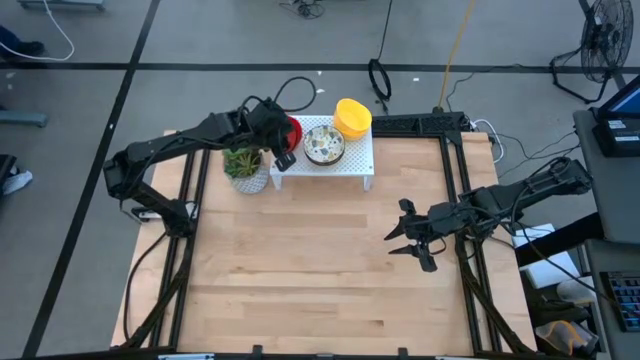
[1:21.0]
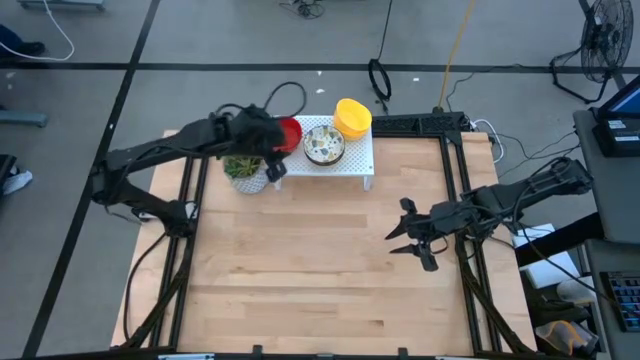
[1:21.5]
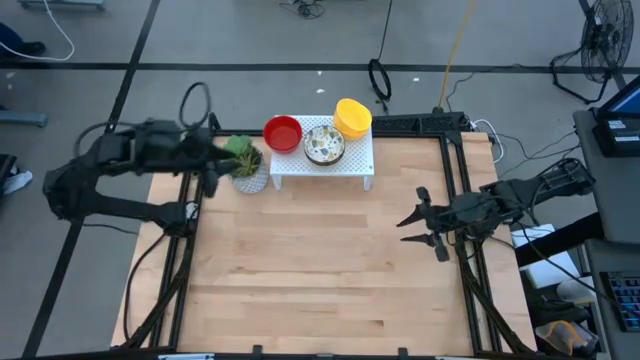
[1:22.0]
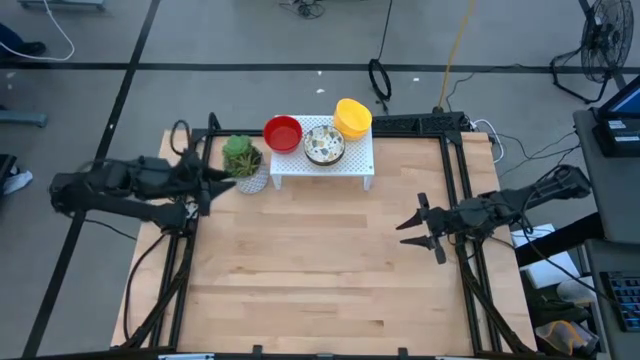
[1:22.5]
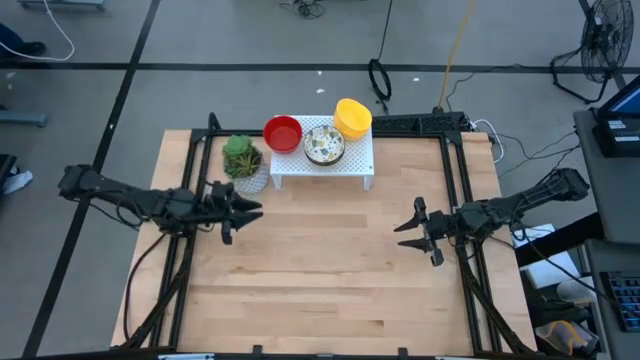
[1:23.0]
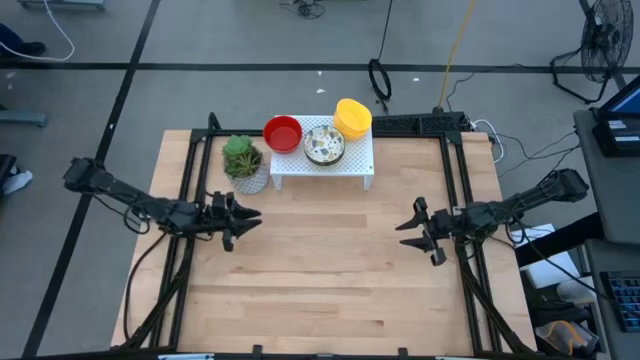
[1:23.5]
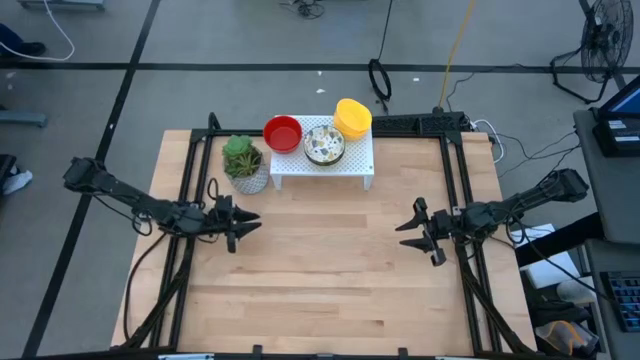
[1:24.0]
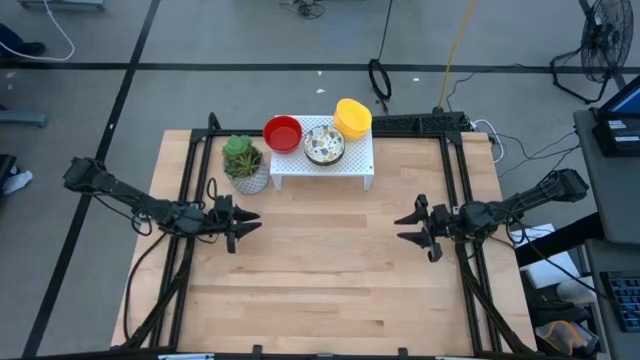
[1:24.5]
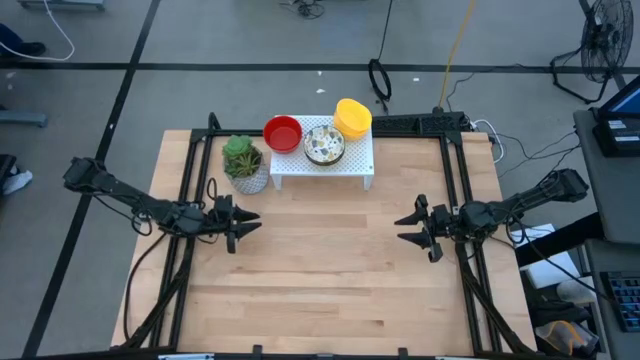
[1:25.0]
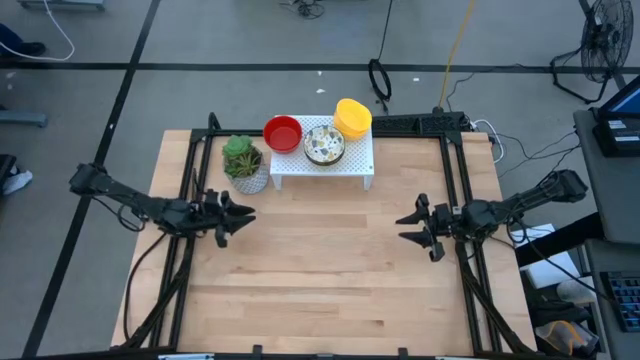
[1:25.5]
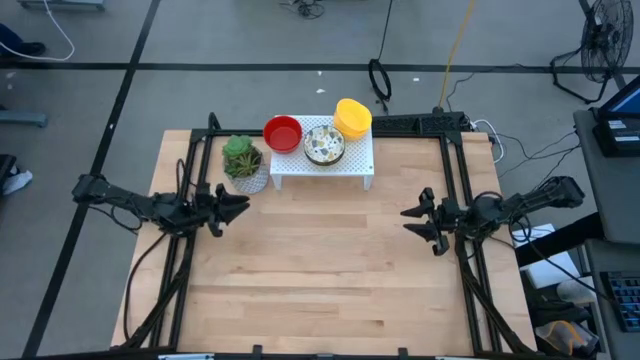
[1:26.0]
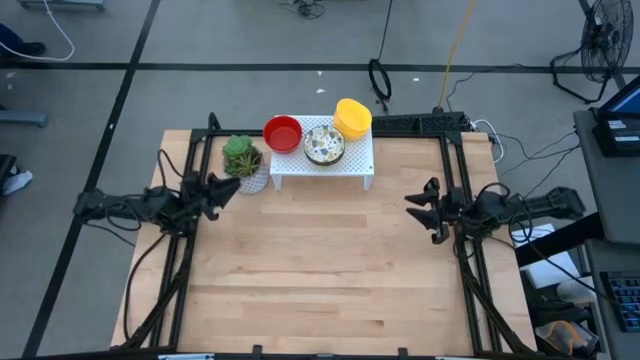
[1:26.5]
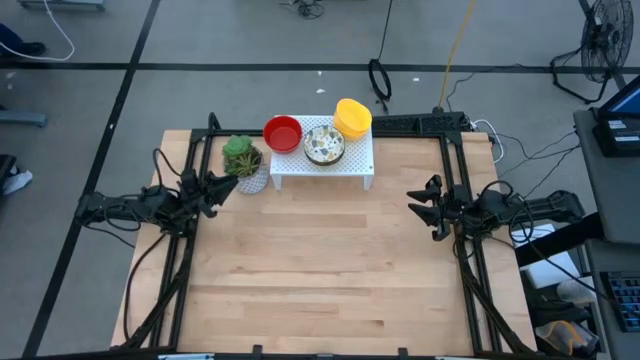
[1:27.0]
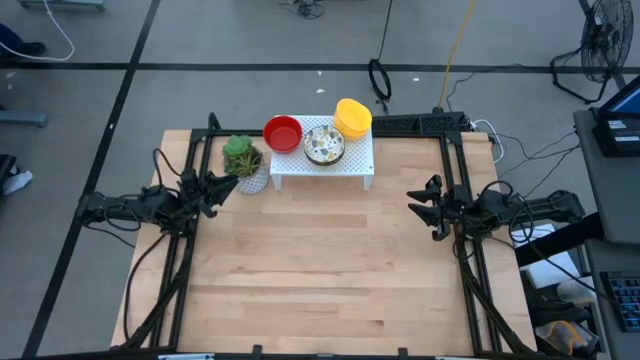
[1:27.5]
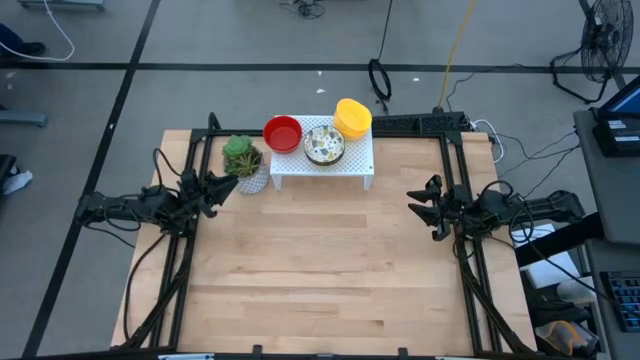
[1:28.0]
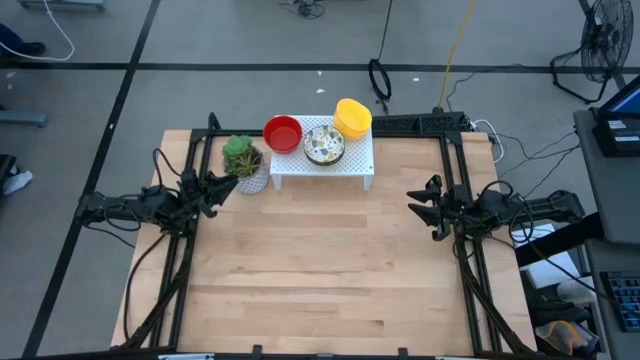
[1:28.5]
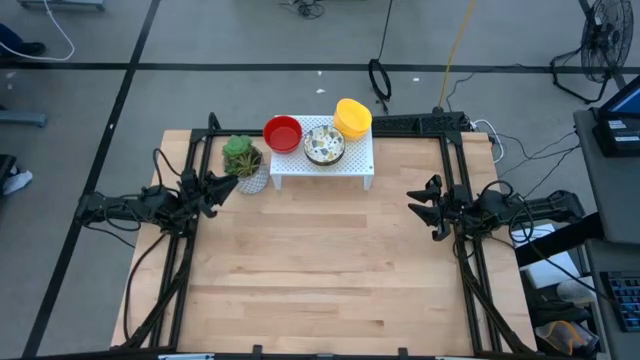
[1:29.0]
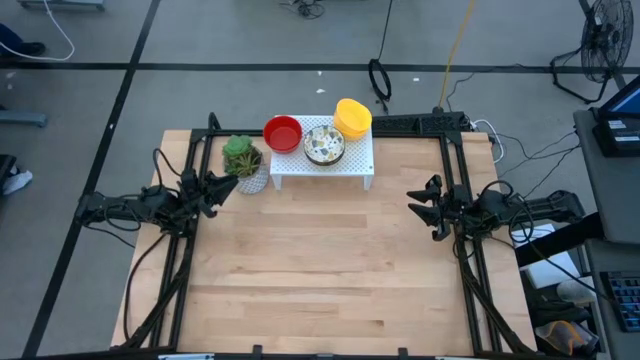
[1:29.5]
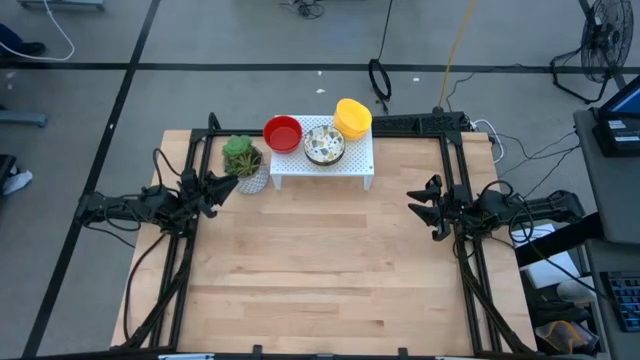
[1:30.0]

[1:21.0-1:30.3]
Task: Pick & Place Mini bowls
Return to Home Position

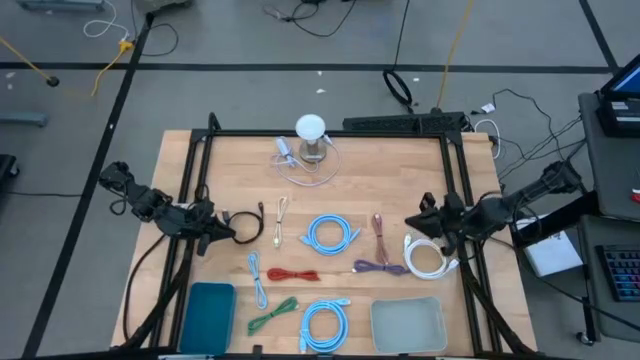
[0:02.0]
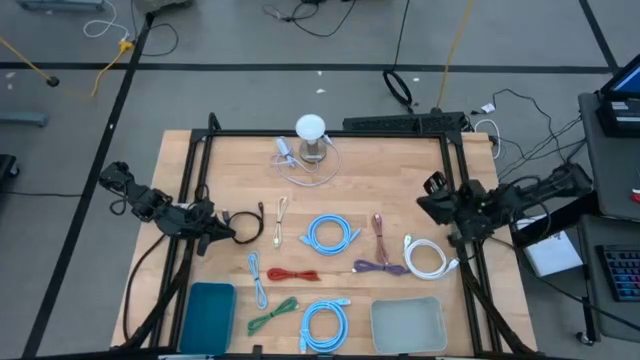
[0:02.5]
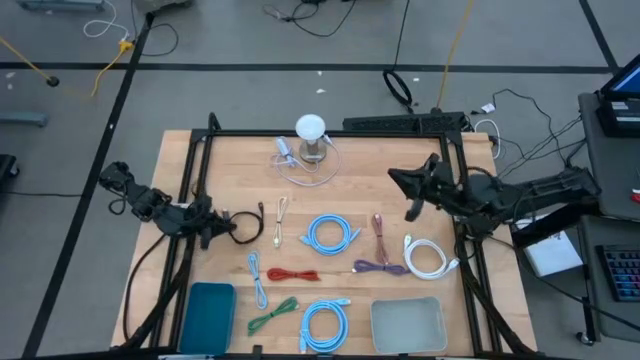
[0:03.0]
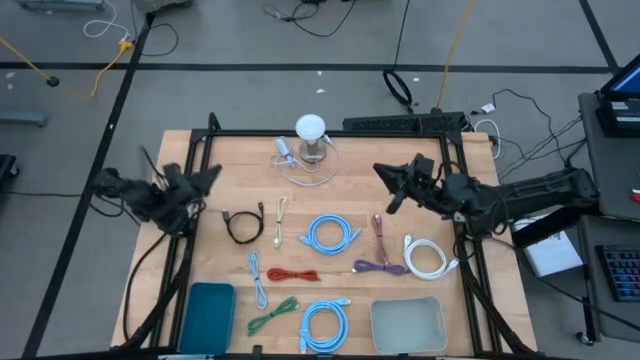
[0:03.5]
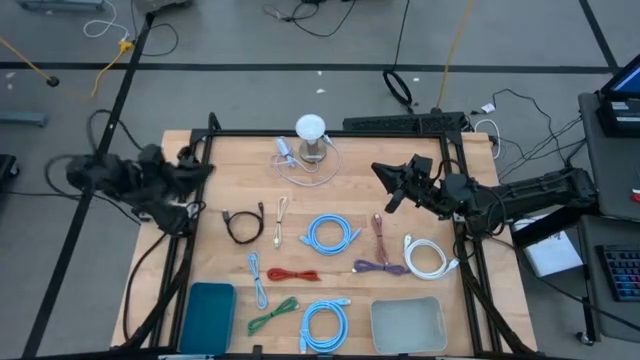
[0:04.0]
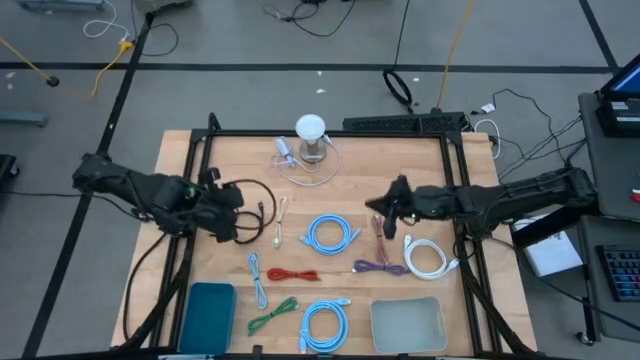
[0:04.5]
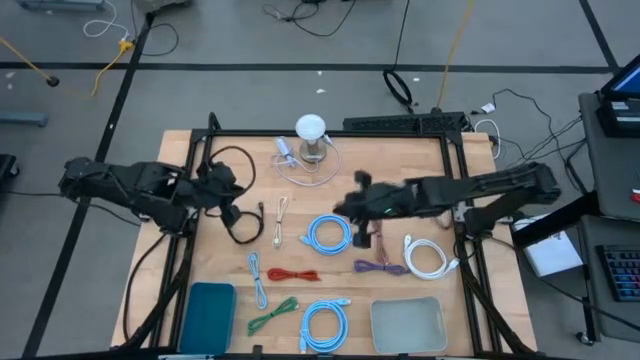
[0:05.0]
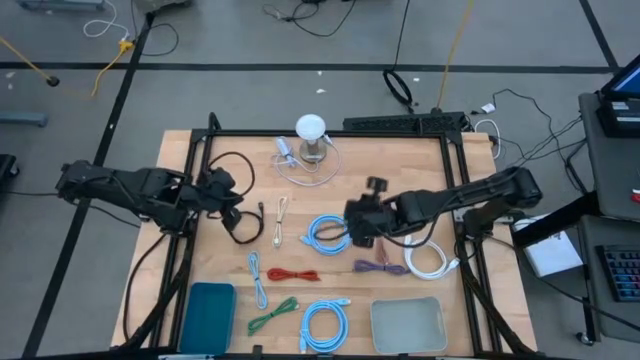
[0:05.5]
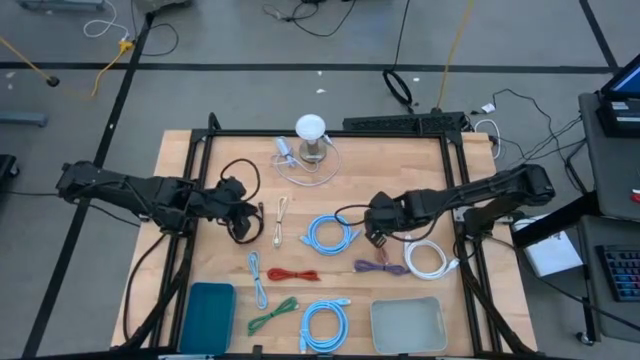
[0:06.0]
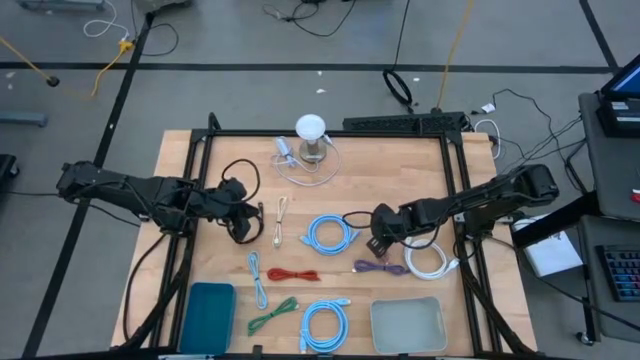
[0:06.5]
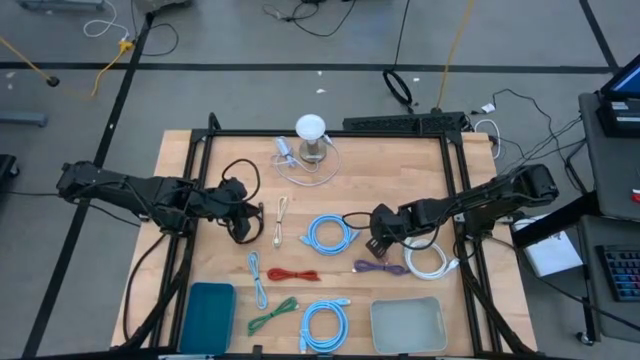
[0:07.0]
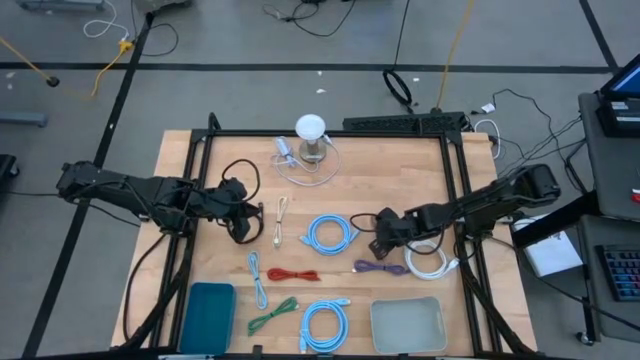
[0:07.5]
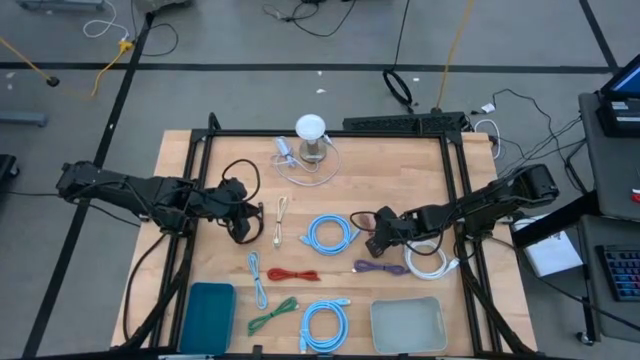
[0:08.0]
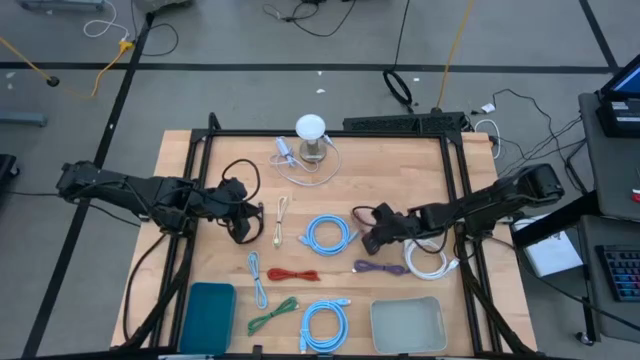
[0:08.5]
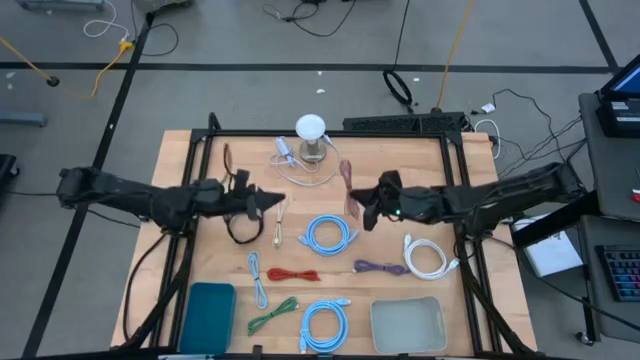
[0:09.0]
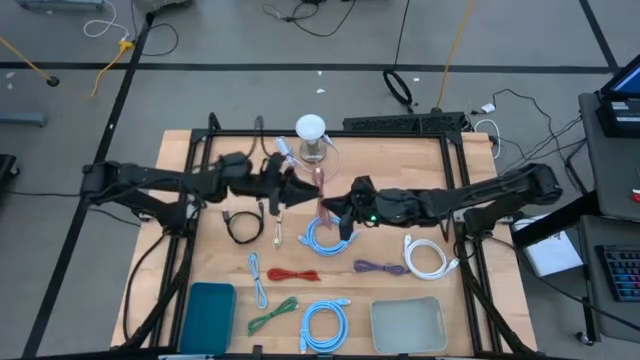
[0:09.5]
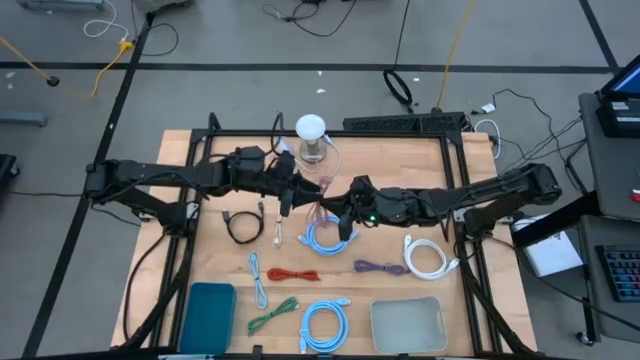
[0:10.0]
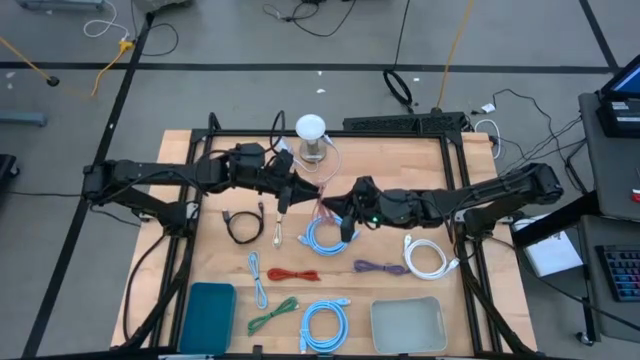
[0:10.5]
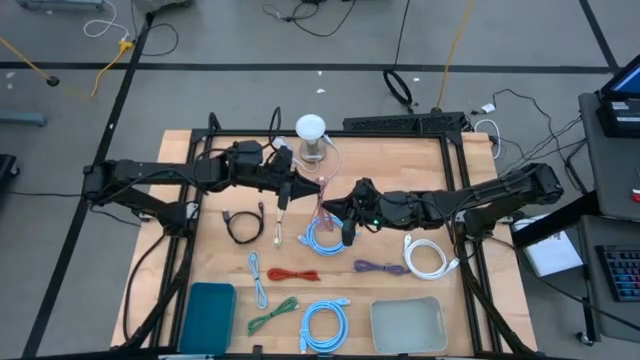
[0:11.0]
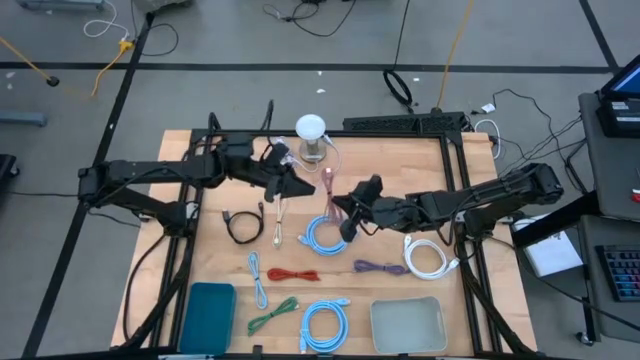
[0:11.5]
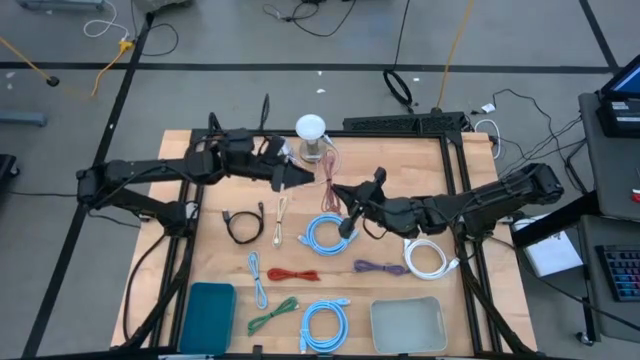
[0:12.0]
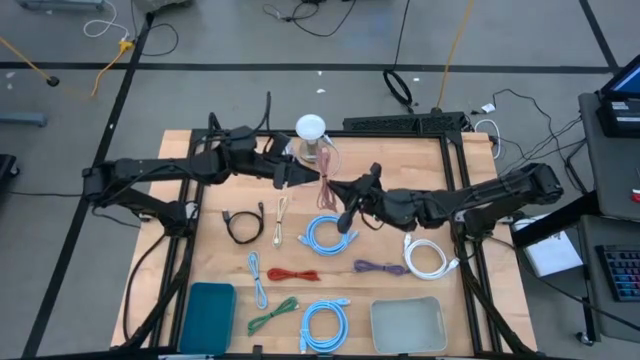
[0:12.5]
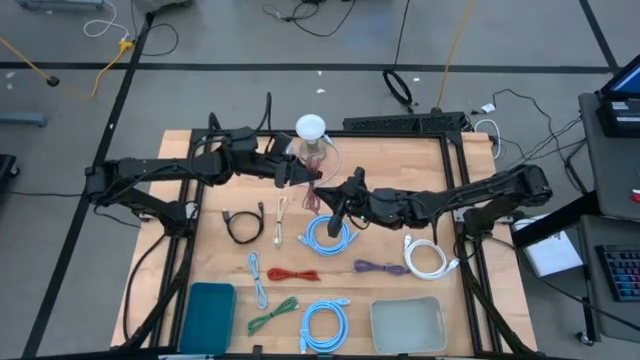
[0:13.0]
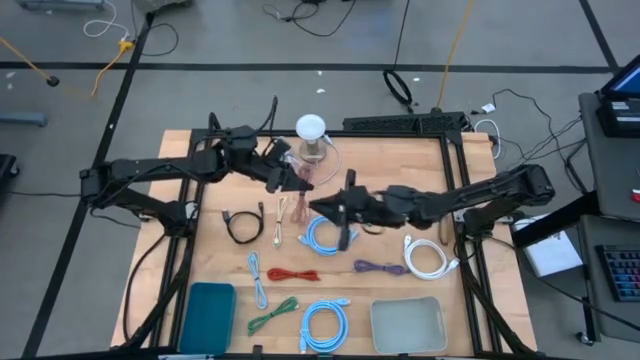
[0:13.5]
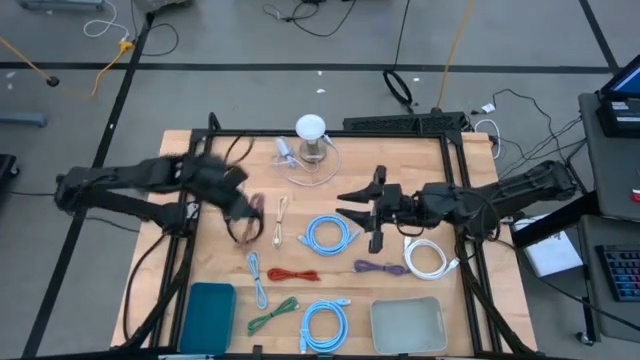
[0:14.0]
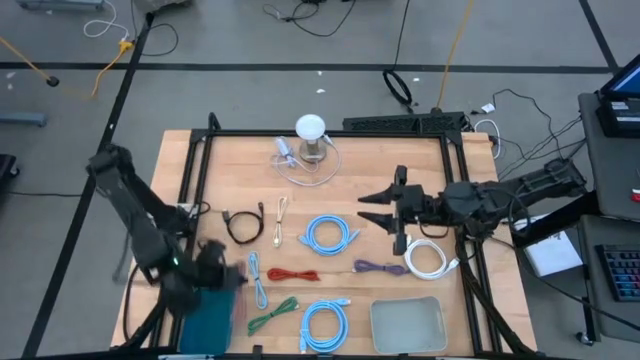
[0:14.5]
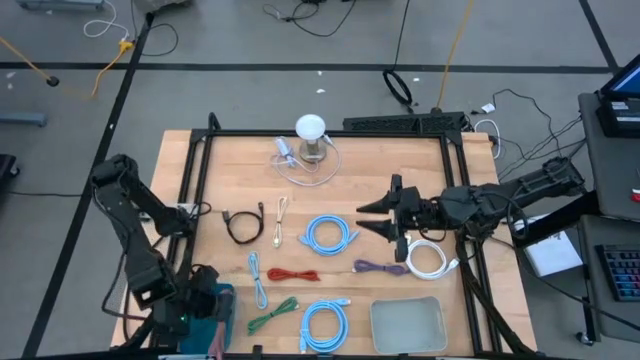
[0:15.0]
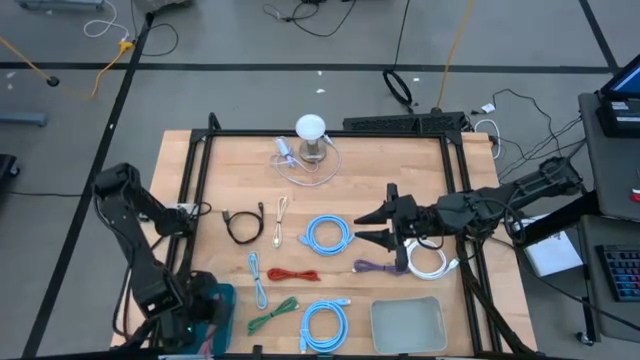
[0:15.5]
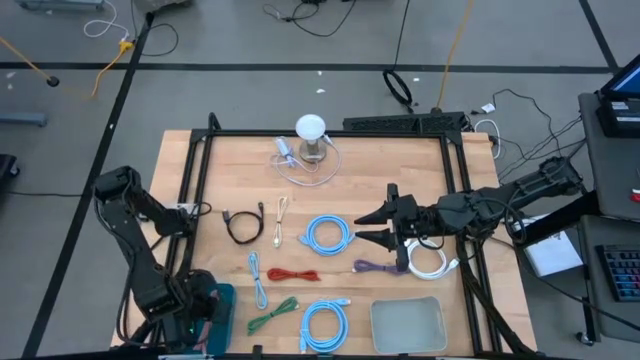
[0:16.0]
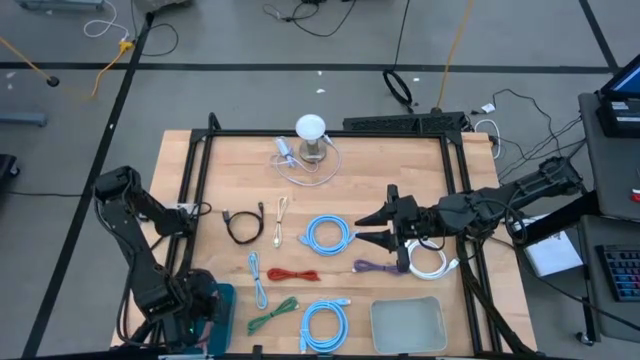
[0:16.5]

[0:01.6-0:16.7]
Task: Pick & Place USB Port
Put the pink charger cable into the blue bin
